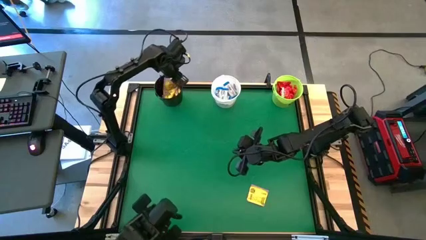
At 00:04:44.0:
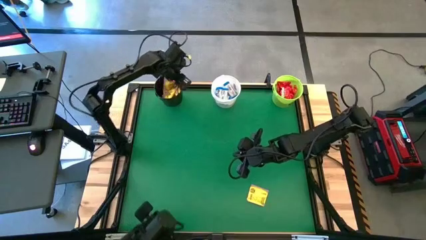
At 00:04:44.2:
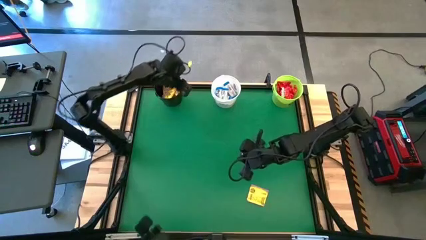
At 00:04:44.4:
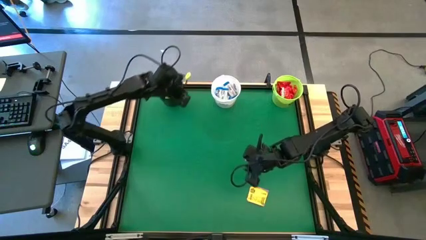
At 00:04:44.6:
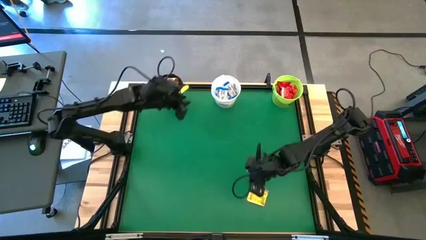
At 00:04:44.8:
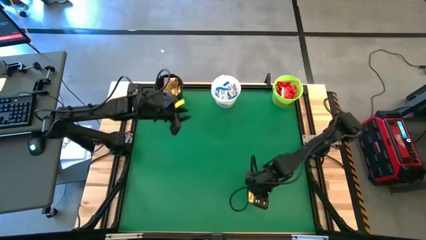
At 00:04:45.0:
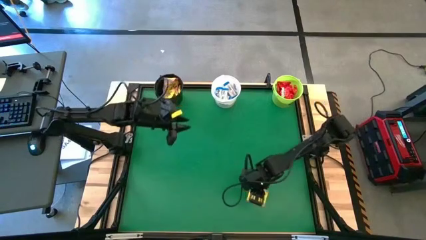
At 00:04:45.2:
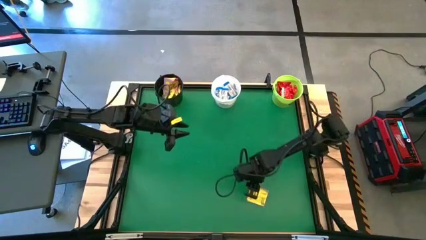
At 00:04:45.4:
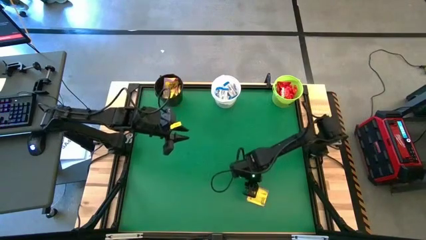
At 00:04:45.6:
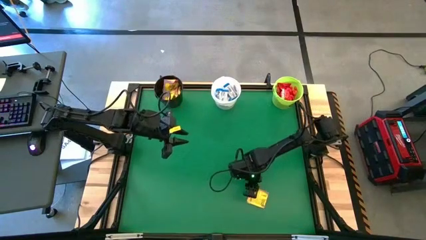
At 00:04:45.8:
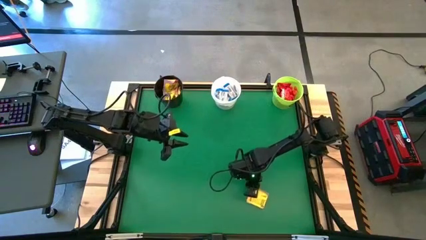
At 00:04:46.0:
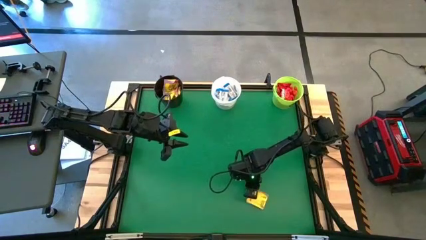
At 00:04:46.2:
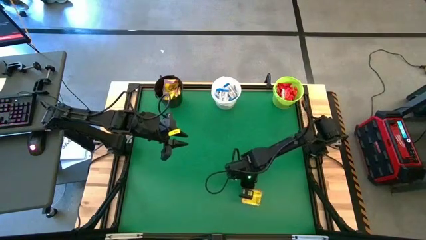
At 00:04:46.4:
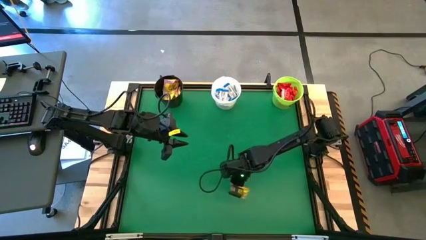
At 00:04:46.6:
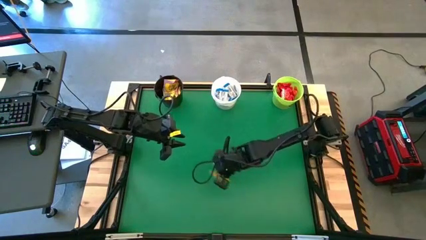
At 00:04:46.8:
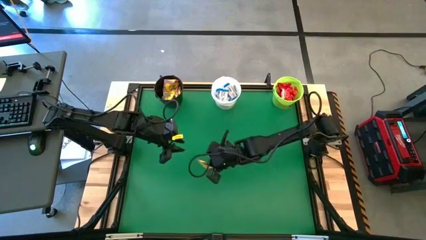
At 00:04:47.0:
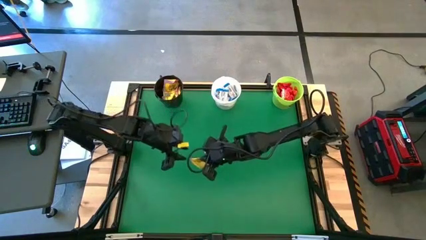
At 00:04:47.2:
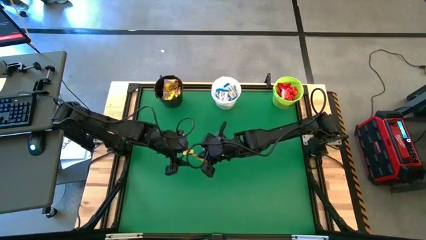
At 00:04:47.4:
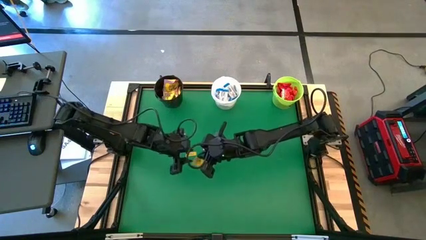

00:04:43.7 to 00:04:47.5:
Task: Sort candy by brand, put in halloween buckets
Put the yellow candy into the black bucket

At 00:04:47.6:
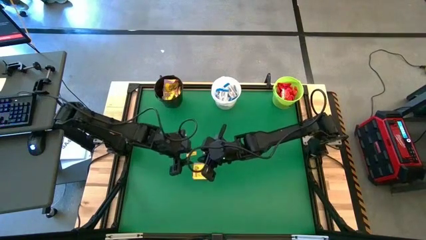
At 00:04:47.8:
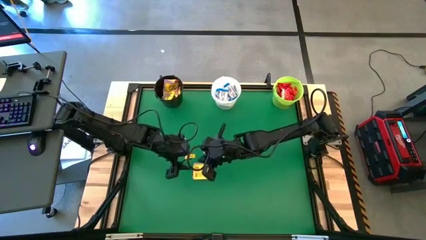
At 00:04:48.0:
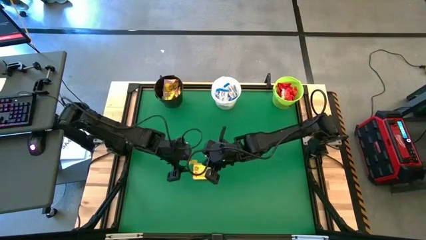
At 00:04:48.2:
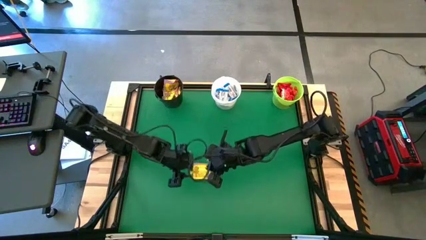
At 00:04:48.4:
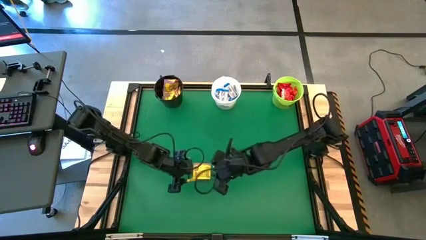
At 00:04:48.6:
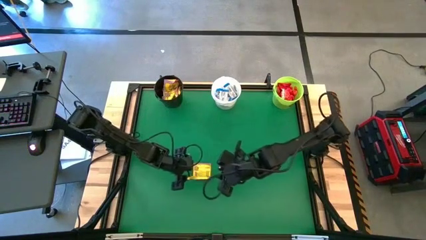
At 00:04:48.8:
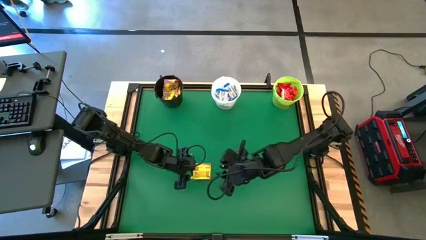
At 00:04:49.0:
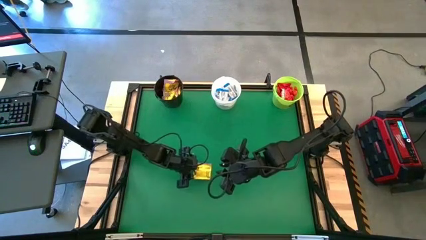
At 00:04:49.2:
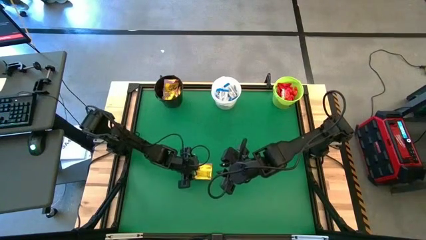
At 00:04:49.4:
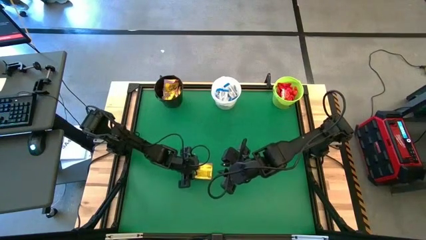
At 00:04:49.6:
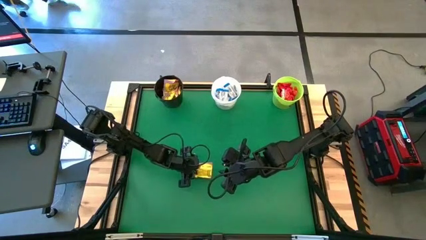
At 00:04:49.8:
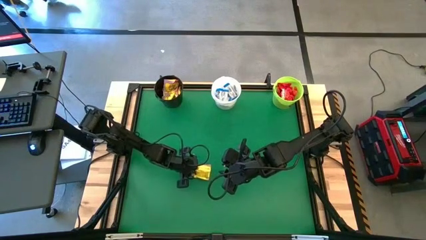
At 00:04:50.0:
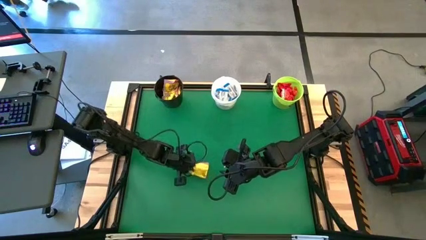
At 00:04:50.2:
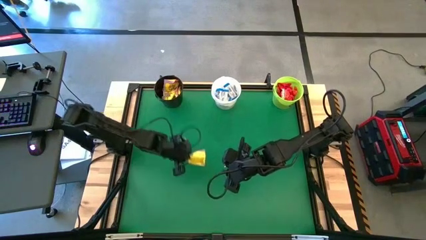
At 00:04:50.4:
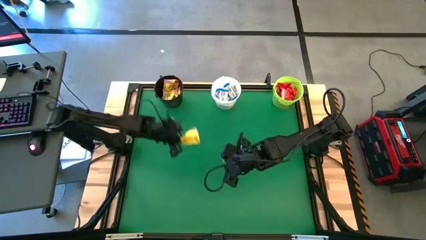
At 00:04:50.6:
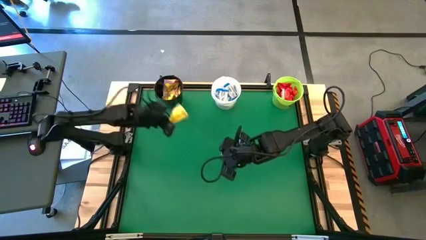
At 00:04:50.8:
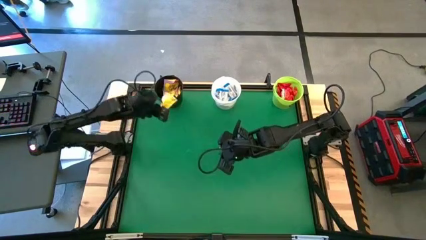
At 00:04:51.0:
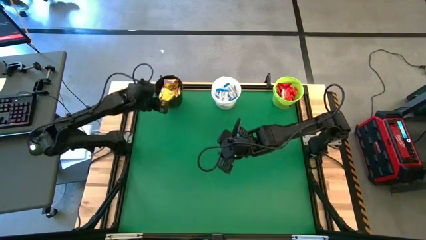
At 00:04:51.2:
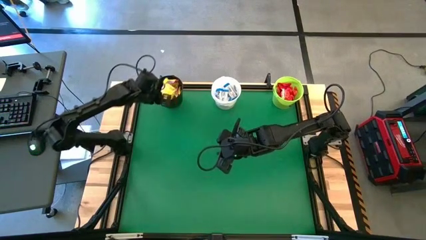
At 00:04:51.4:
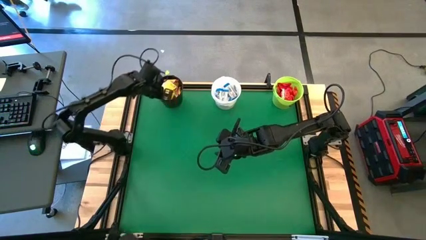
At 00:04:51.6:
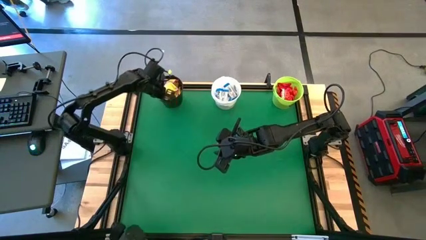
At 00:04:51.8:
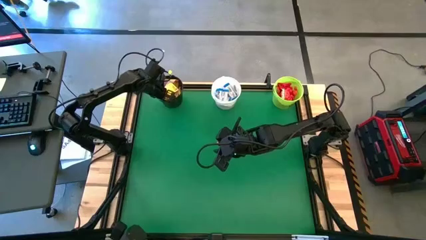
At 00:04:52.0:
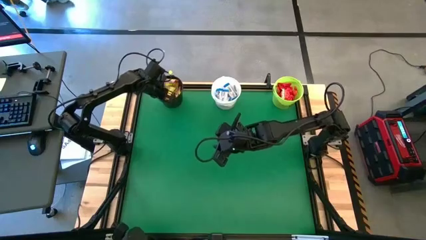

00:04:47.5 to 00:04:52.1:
Put the yellow candy into the black bucket

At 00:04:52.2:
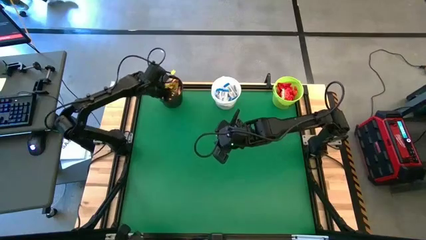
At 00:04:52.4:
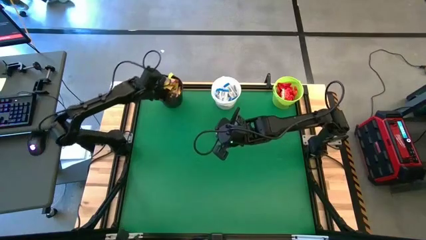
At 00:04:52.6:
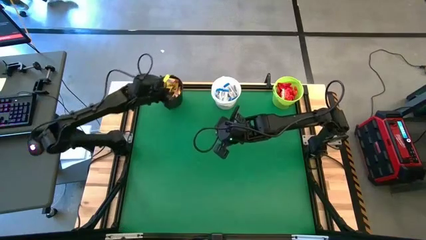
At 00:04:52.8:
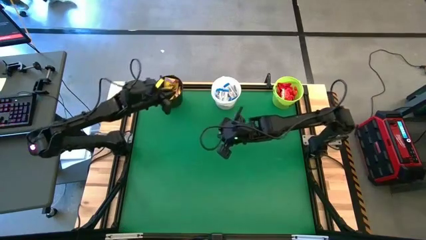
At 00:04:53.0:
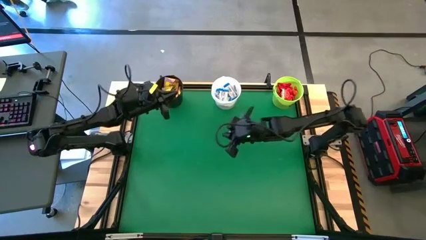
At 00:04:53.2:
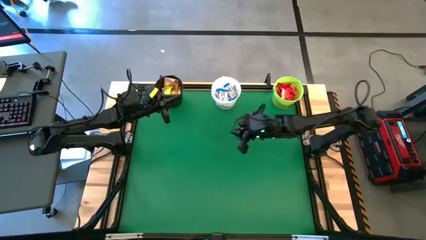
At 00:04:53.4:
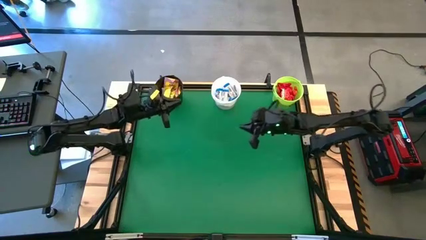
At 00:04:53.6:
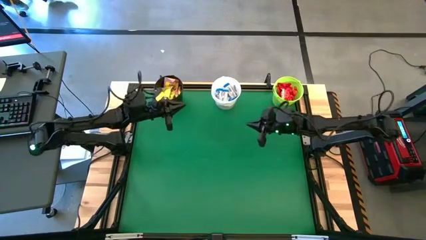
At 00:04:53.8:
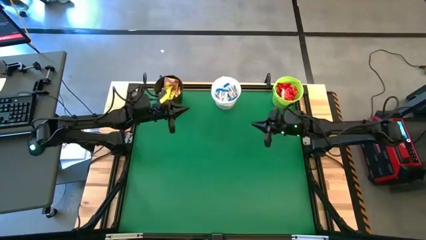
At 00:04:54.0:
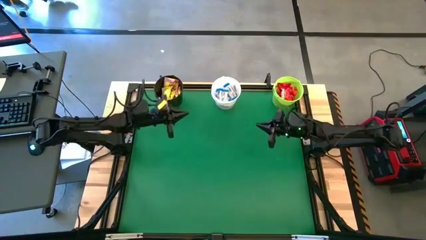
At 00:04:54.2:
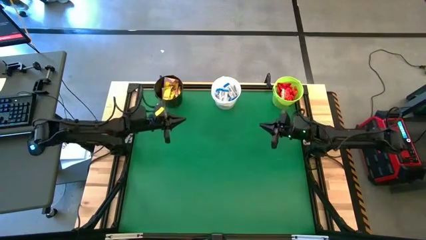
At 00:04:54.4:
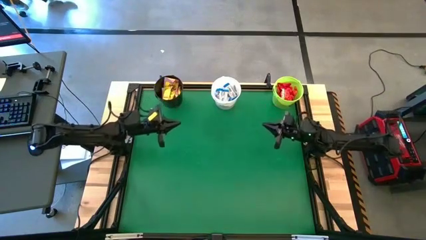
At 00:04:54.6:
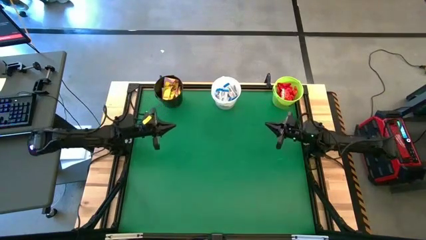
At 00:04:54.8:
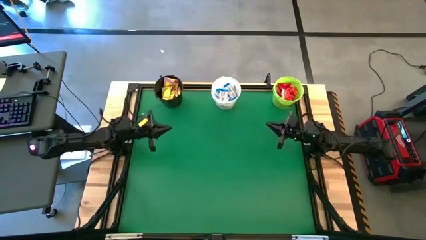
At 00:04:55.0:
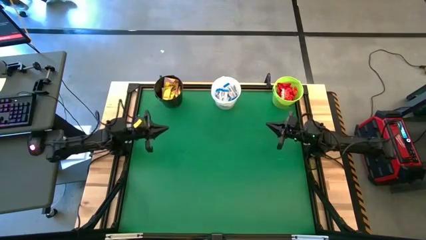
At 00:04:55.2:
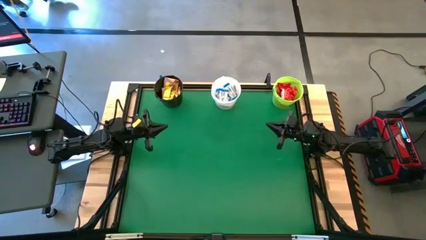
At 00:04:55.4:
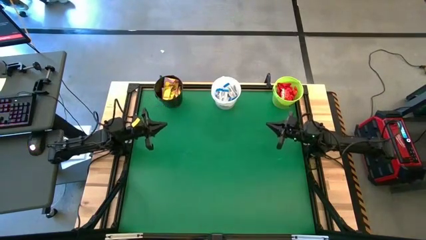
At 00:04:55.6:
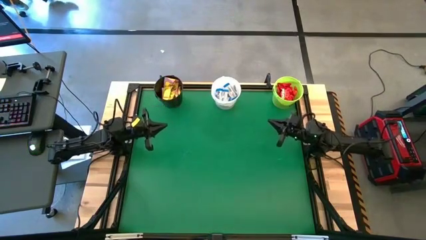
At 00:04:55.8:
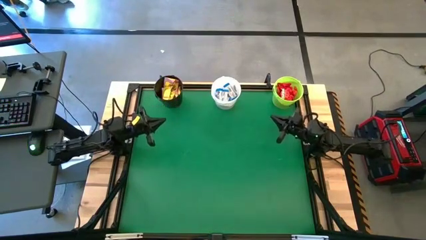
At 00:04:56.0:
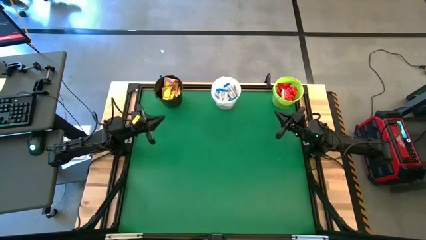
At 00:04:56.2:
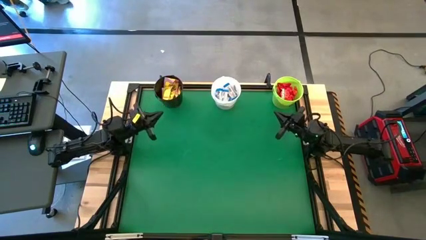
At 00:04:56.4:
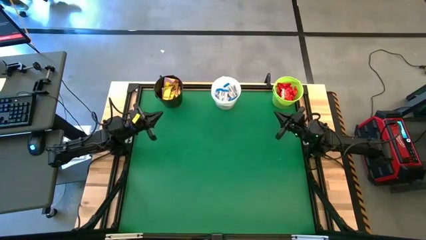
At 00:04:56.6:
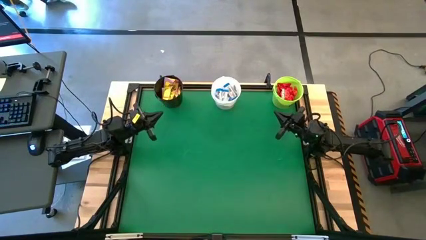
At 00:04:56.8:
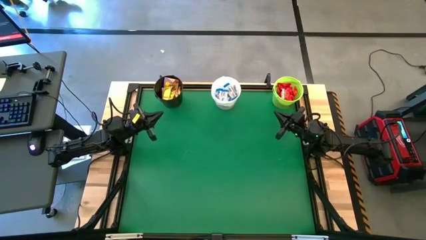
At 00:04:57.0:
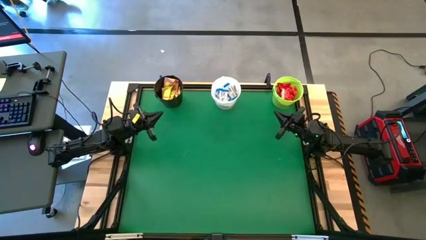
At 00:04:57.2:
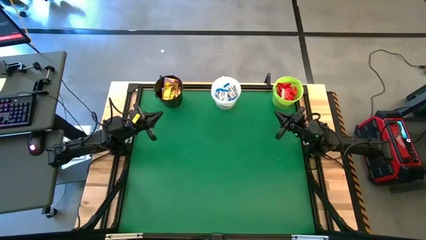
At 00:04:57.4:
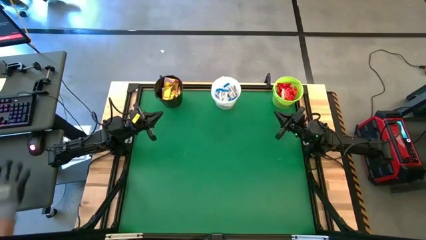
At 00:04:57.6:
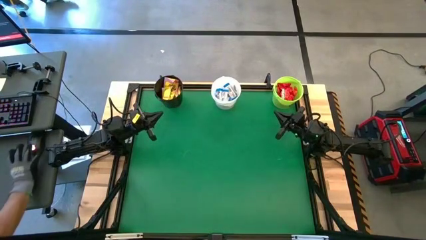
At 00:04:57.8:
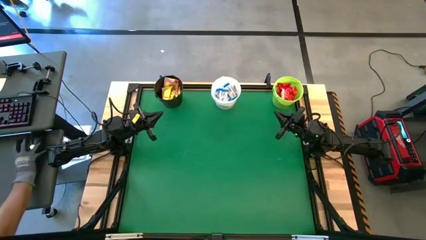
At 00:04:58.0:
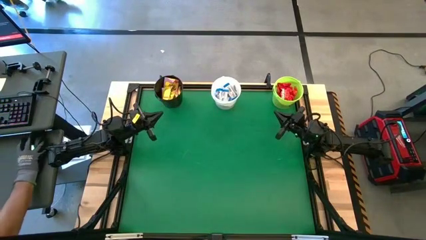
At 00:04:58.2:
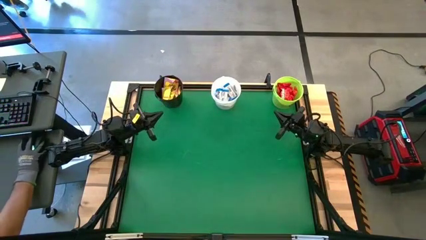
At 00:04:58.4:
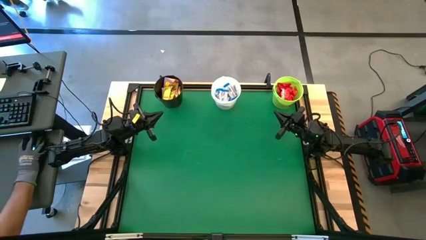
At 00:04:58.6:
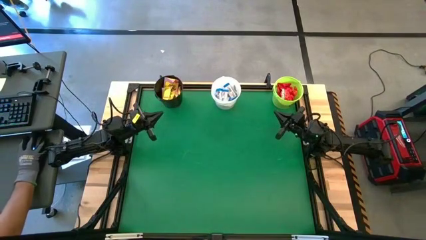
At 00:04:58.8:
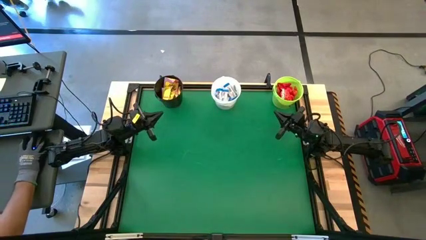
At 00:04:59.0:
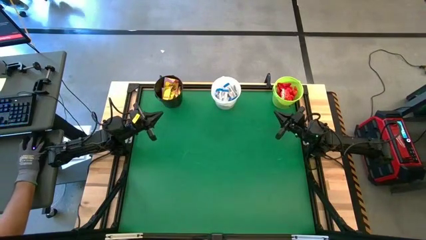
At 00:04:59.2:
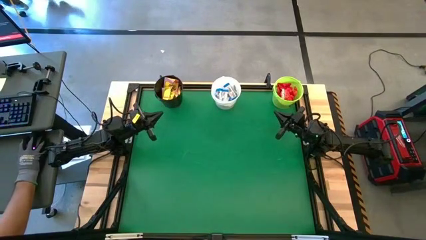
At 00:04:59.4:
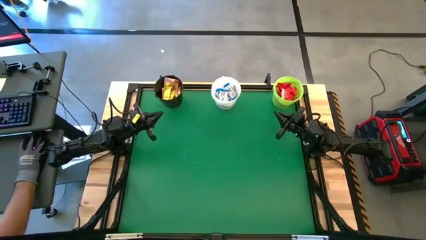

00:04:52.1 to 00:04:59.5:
Return to Home Position
